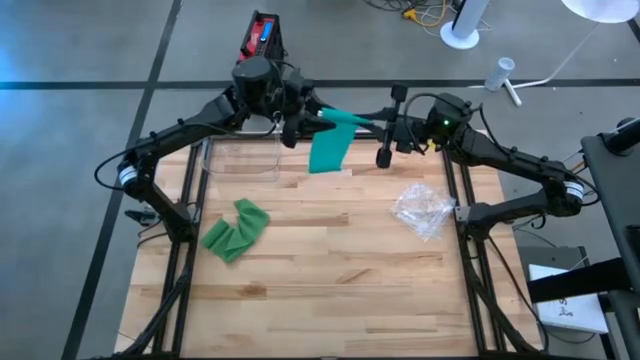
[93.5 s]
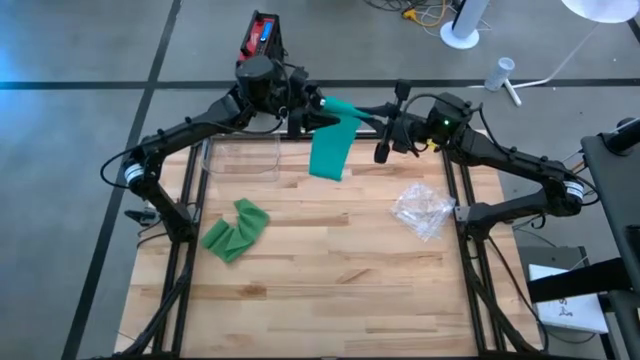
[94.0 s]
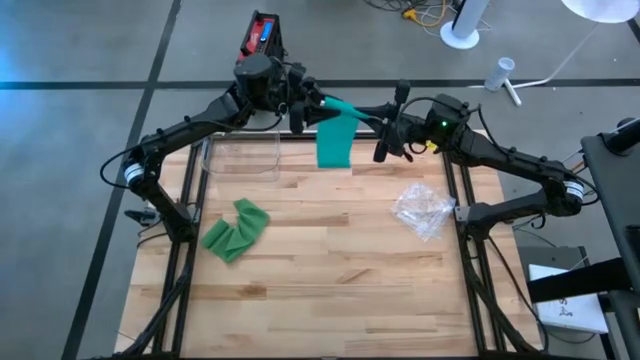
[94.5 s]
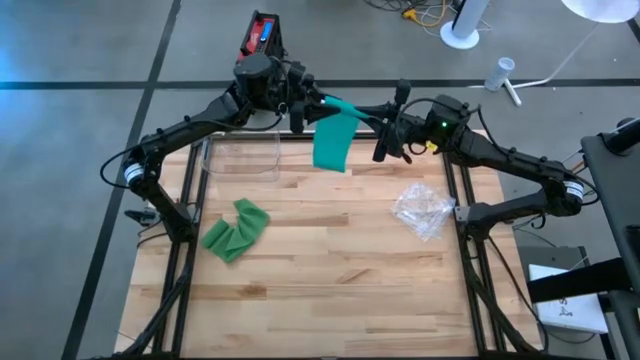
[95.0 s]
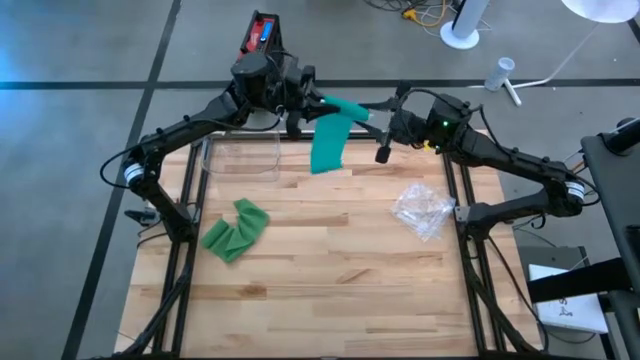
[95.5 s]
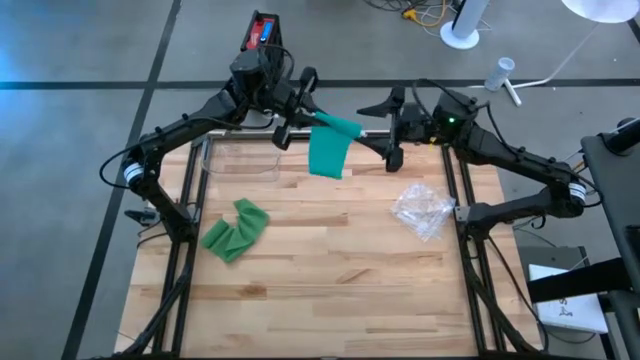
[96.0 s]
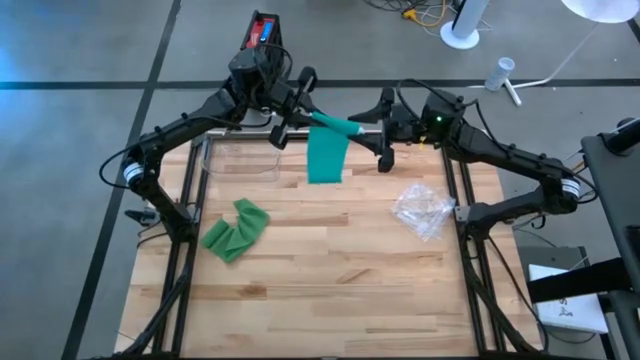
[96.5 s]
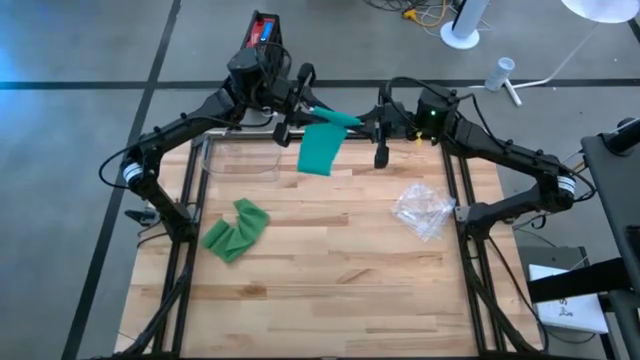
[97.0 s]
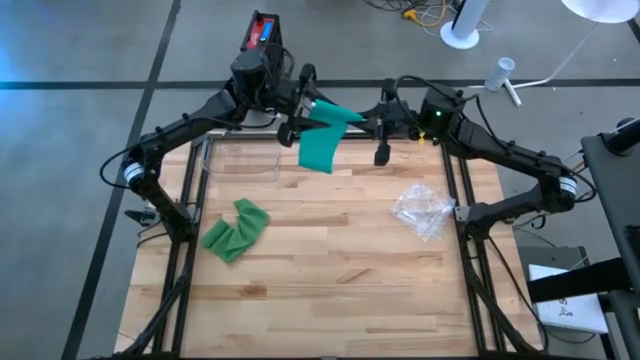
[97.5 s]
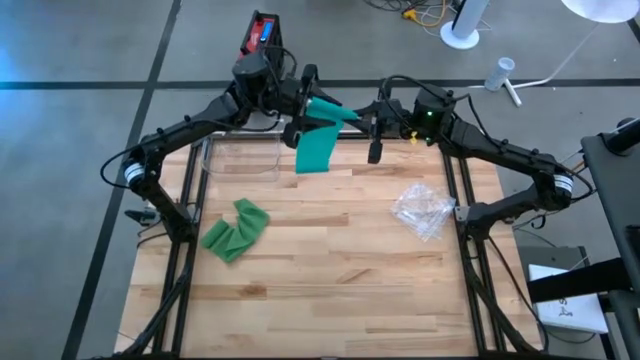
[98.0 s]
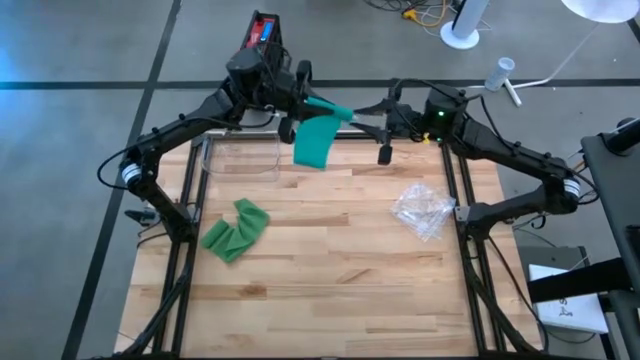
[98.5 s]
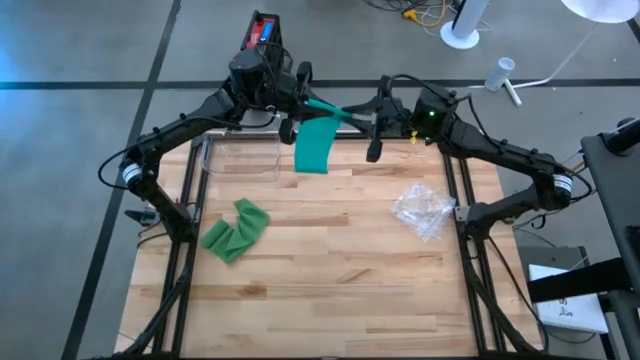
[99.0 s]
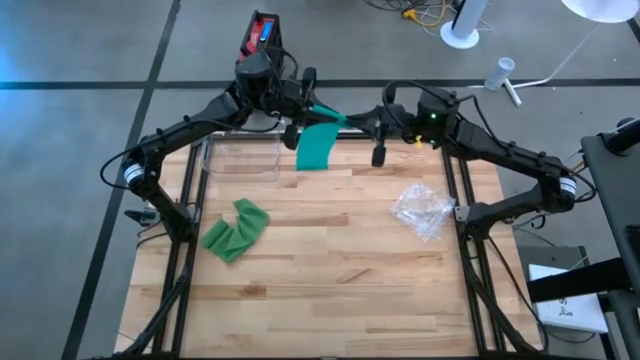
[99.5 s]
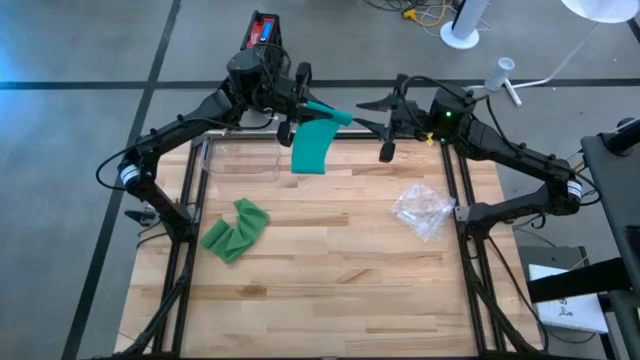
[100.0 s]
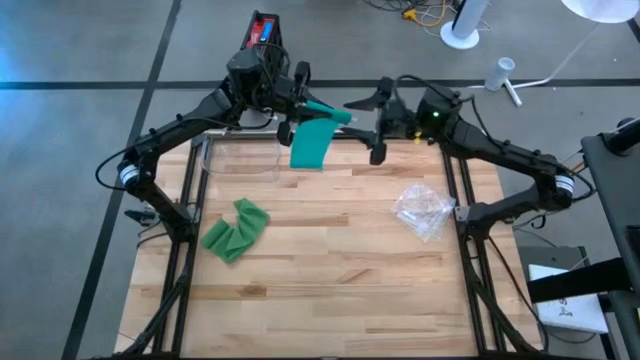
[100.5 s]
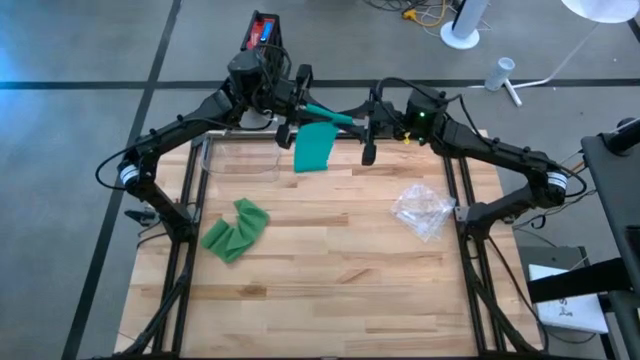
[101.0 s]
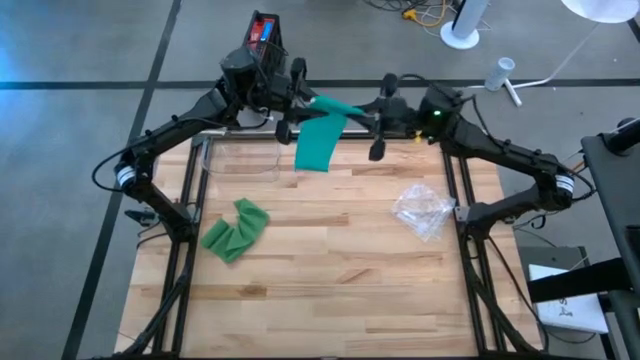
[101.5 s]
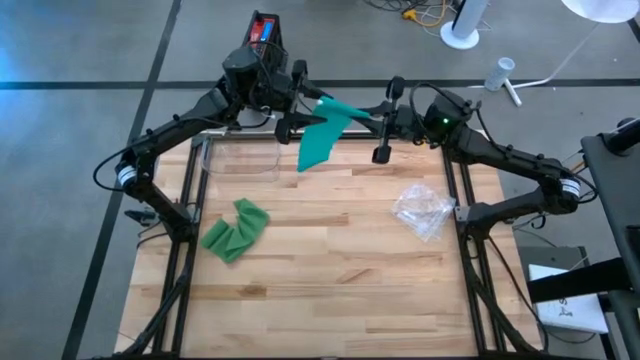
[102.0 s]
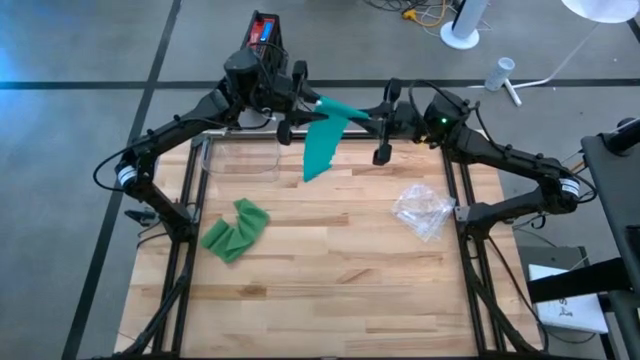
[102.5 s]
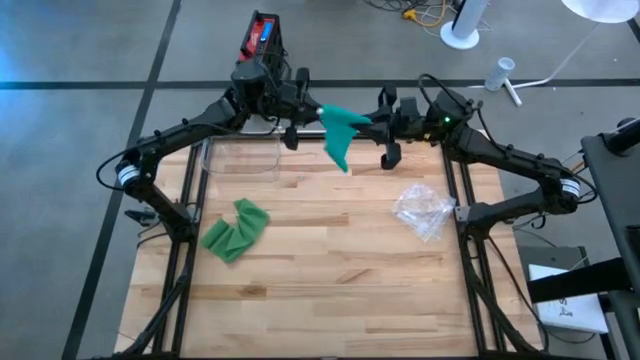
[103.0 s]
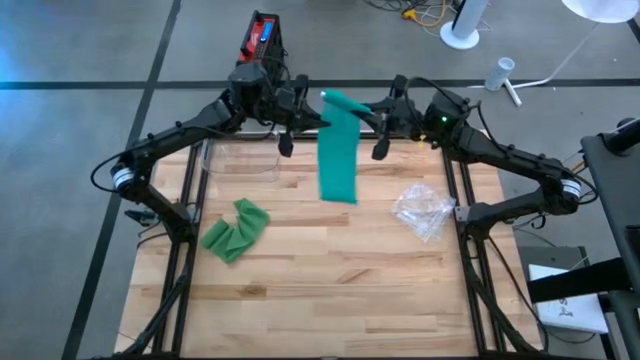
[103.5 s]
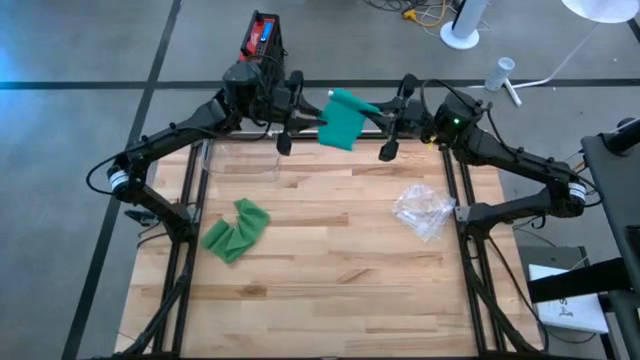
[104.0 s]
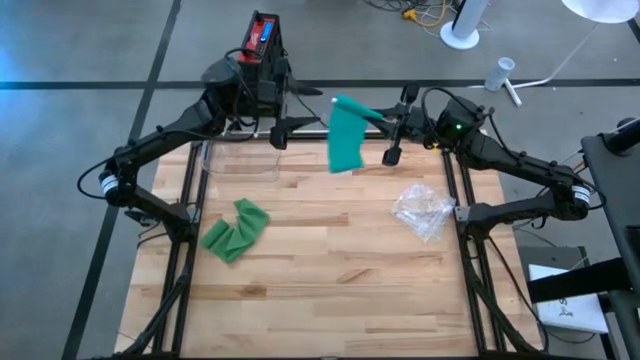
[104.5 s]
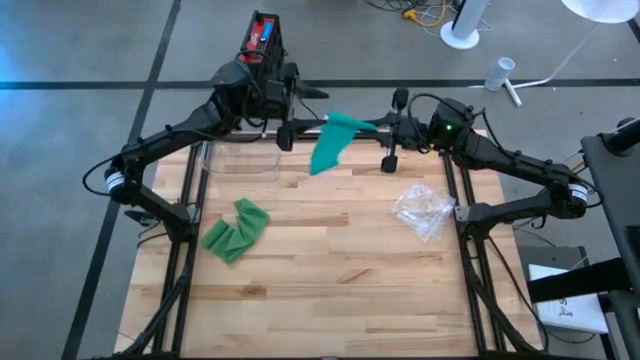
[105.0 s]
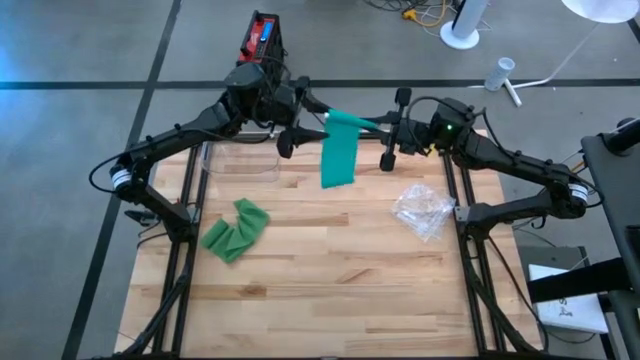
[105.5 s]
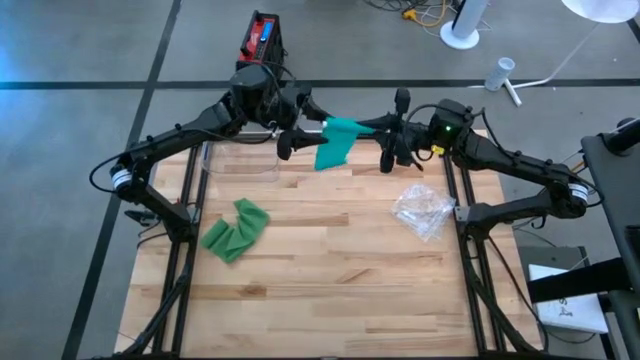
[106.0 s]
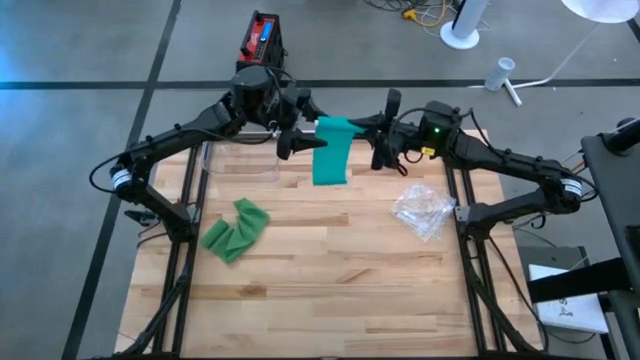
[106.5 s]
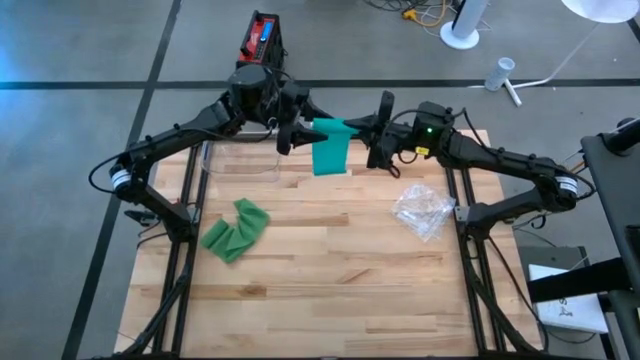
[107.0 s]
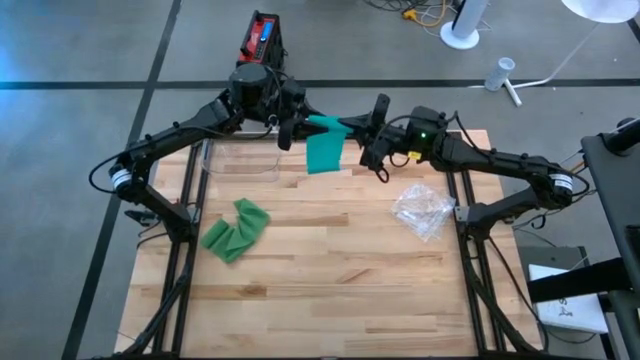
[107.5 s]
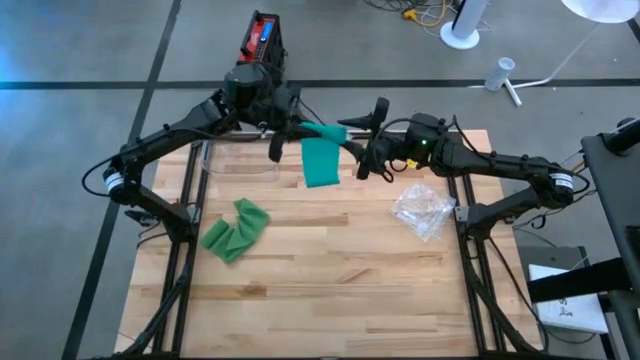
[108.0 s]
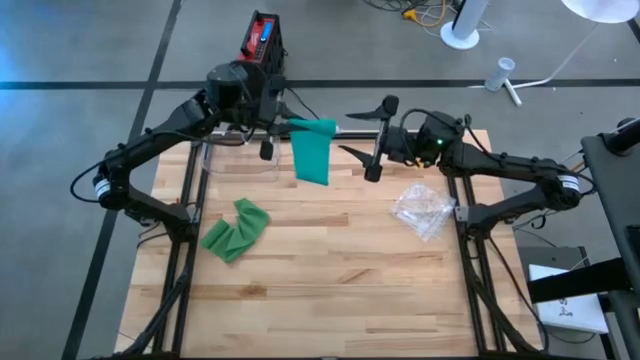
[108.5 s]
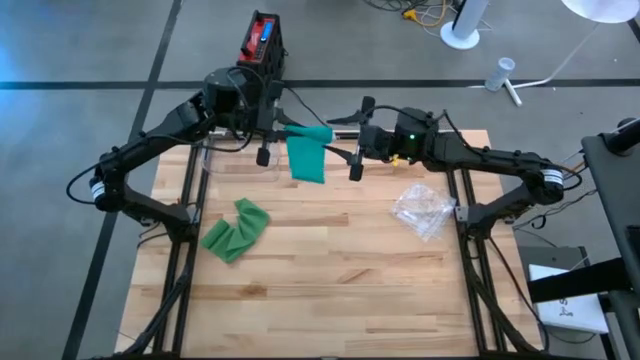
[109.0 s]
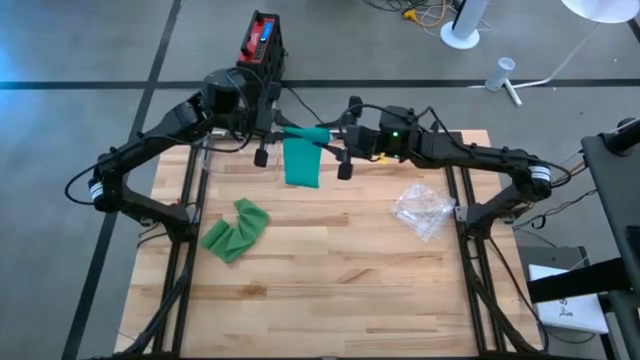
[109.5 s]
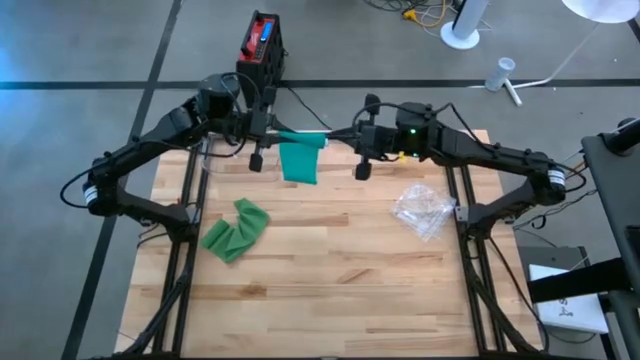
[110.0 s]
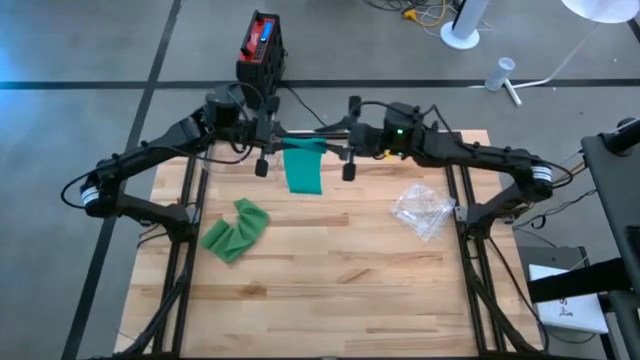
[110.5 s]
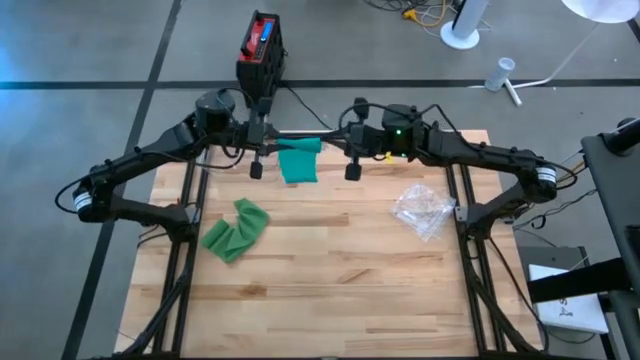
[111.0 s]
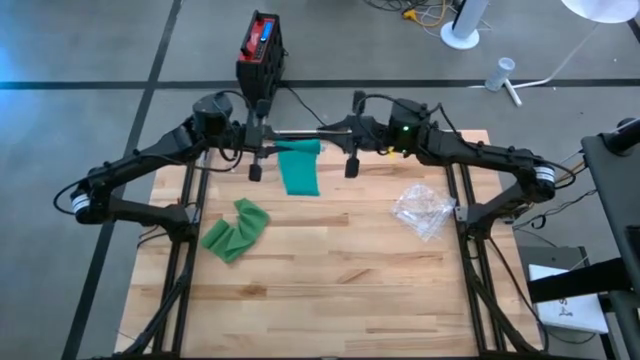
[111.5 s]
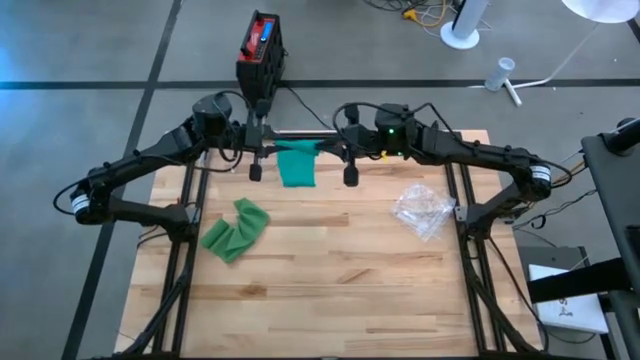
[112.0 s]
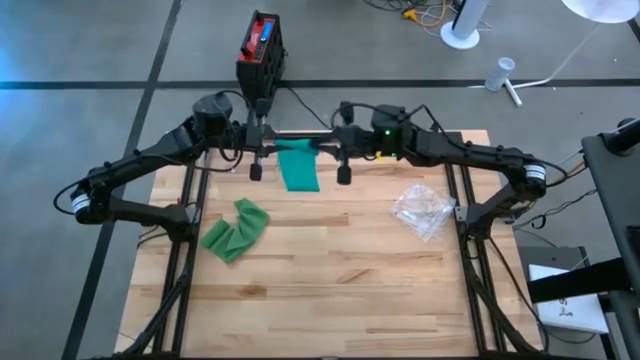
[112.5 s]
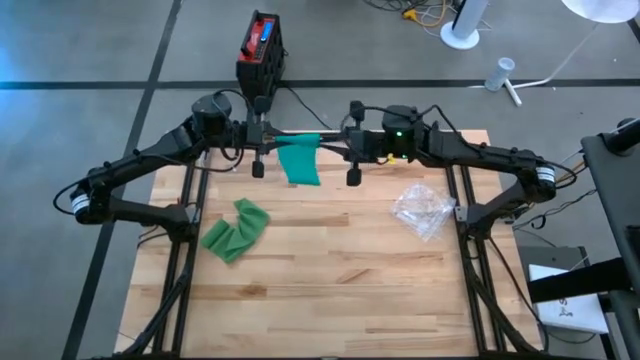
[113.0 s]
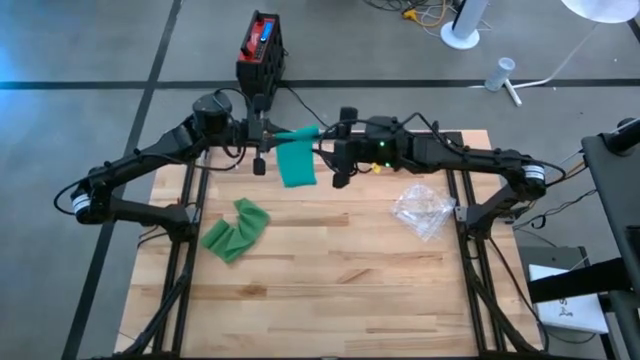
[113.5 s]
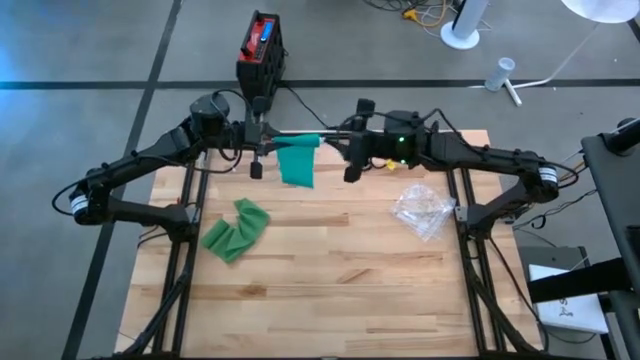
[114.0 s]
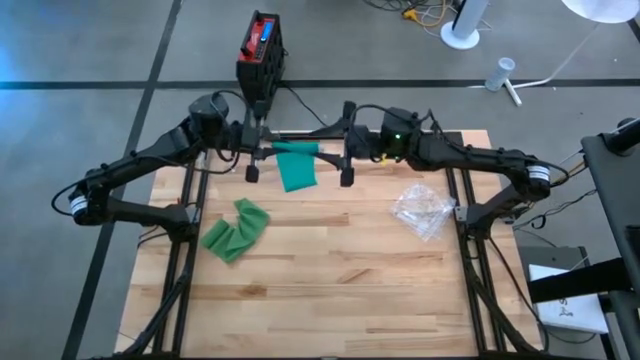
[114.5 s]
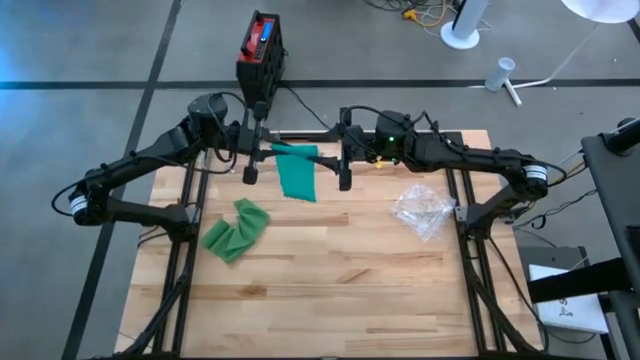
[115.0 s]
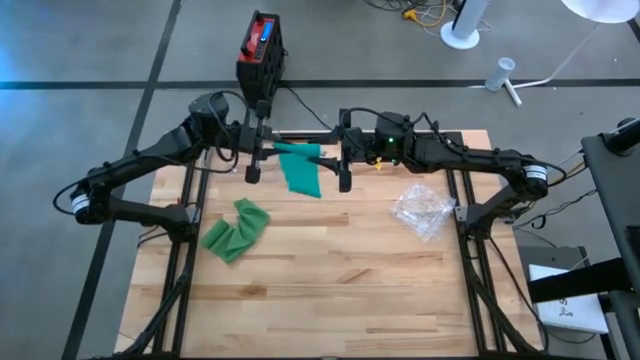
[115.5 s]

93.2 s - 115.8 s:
Task: Roll bandage
Roll the blue bandage
